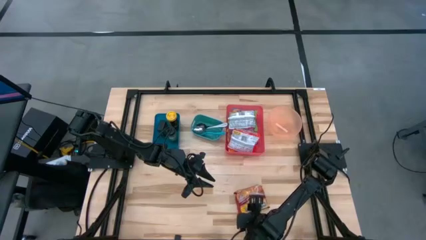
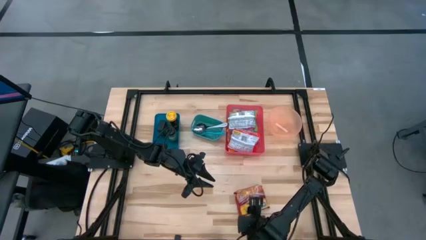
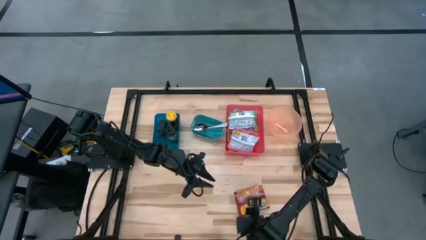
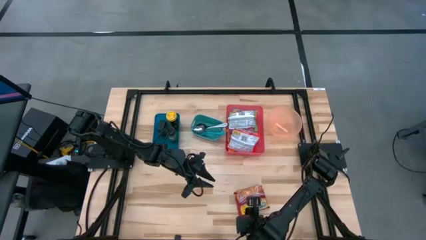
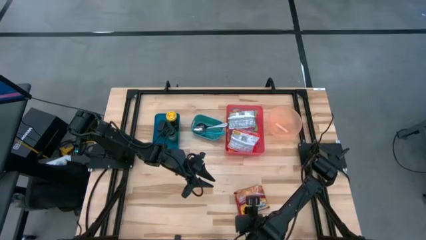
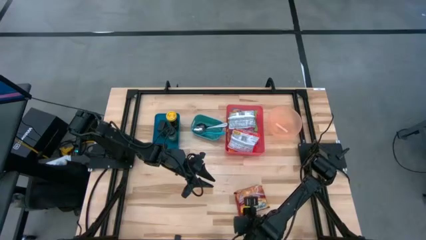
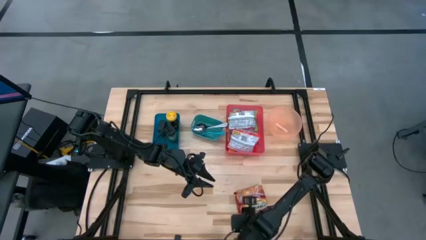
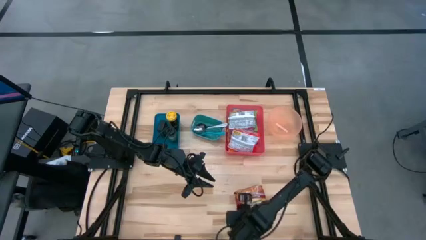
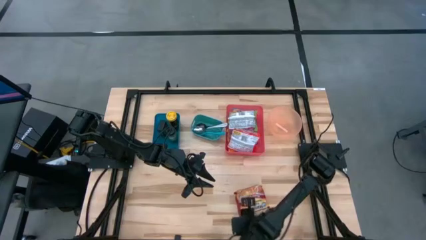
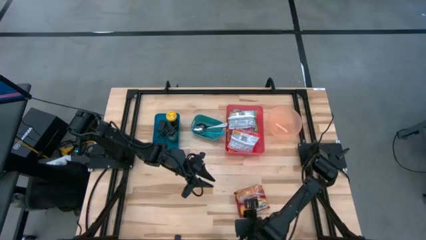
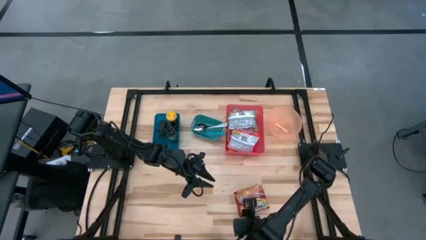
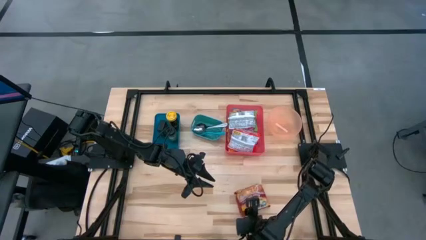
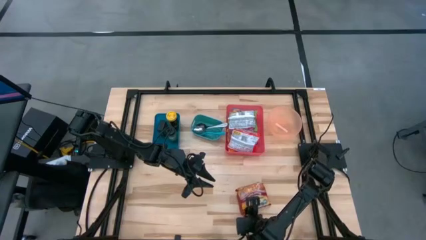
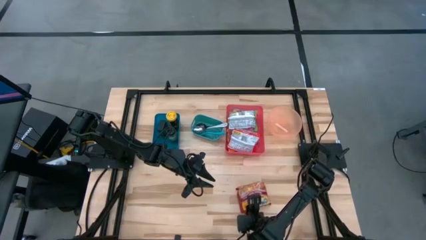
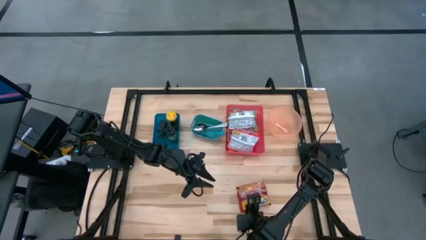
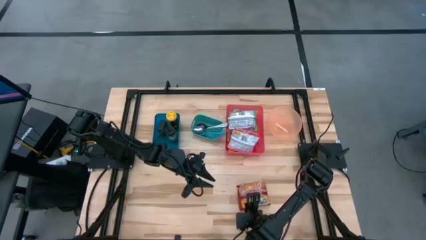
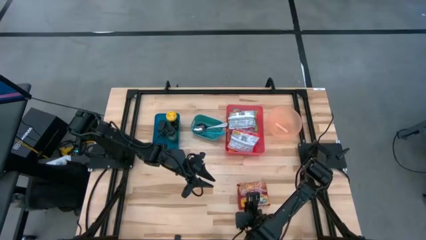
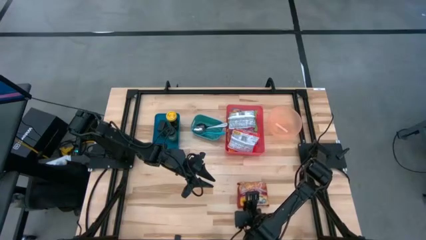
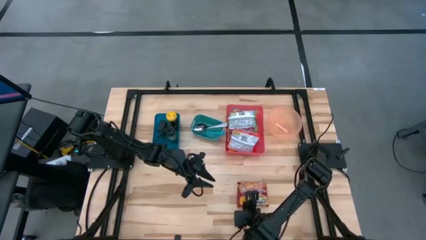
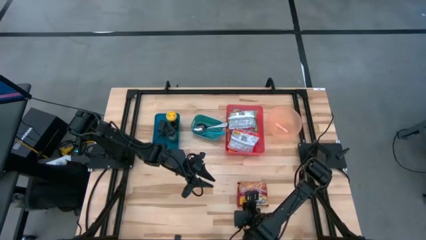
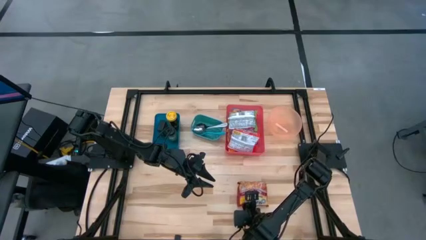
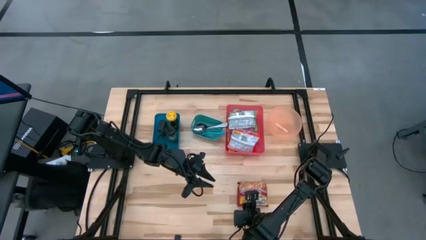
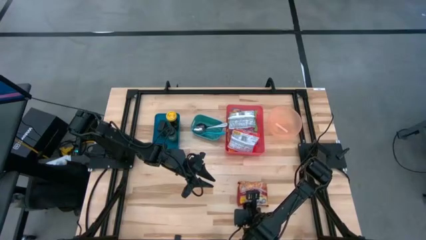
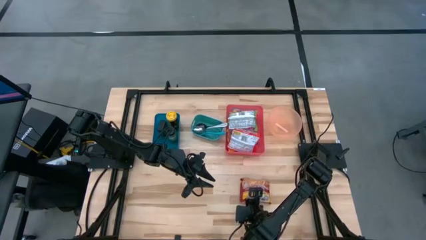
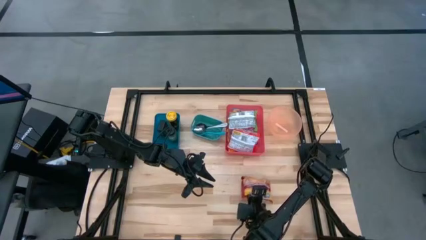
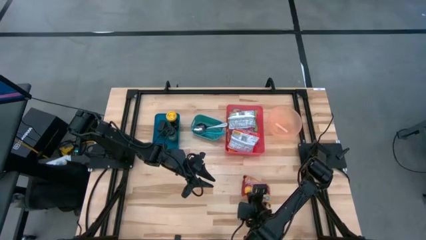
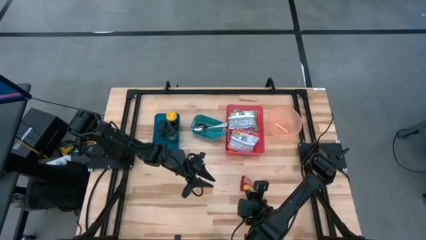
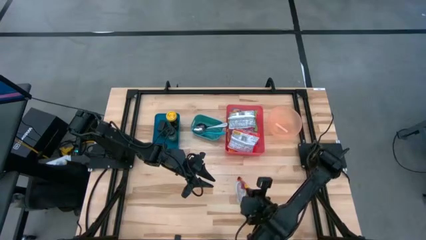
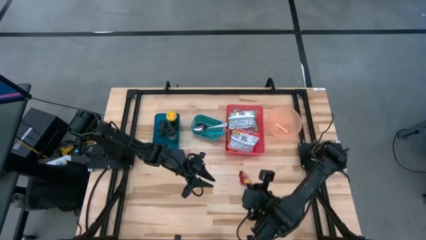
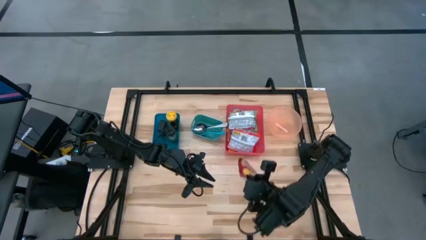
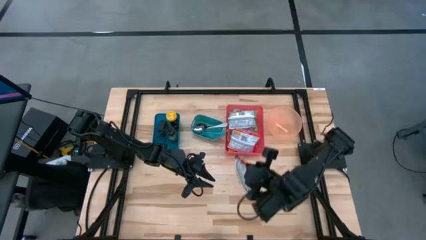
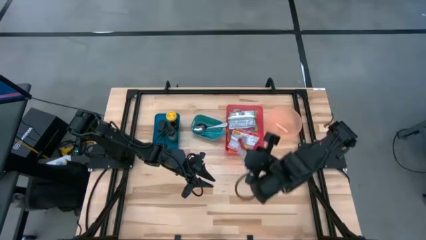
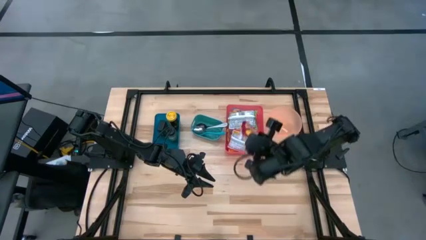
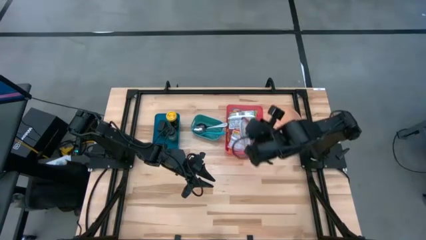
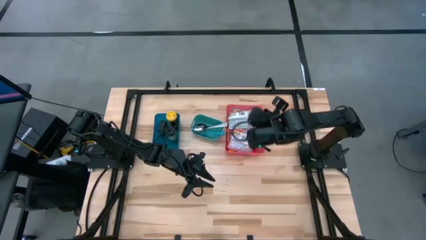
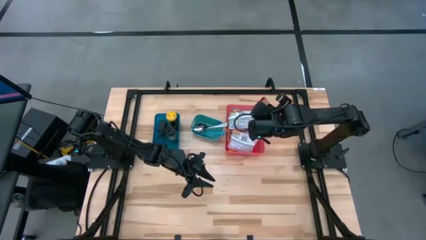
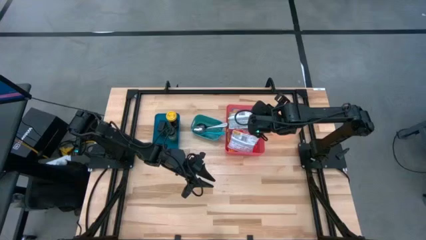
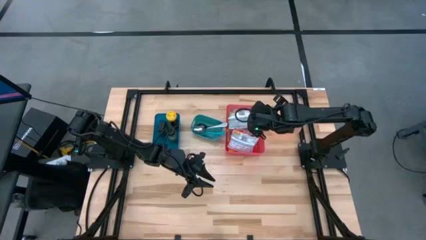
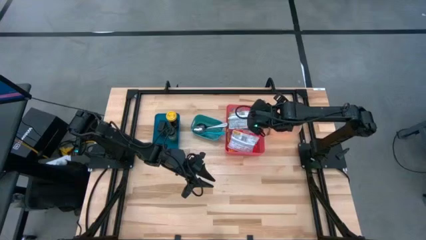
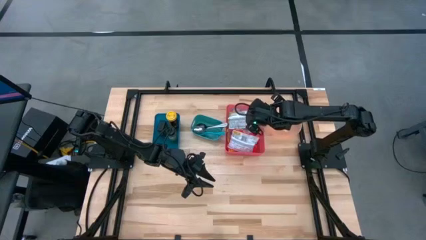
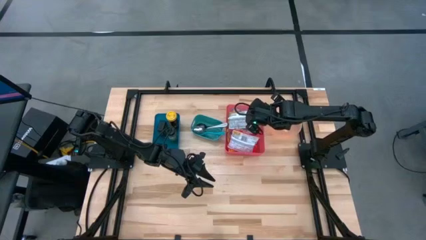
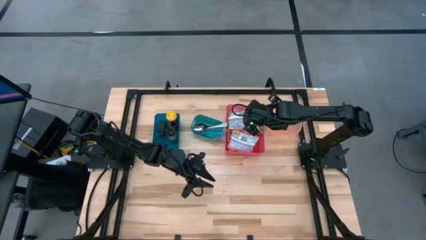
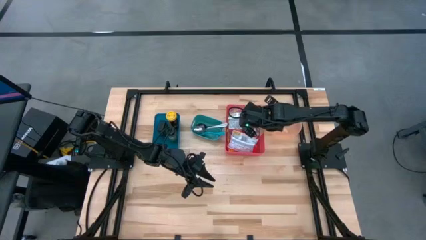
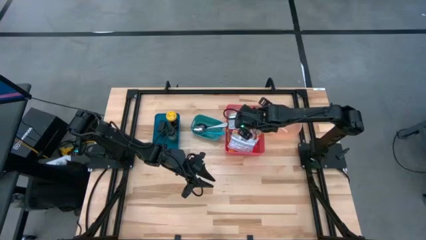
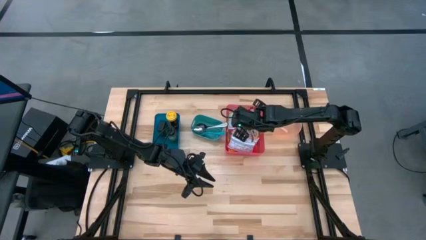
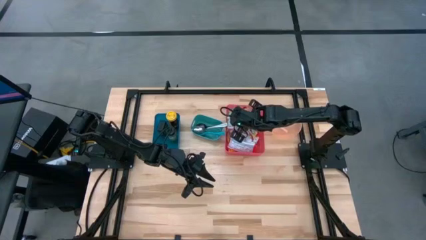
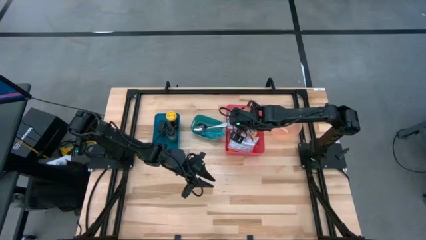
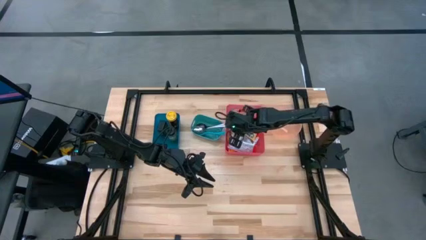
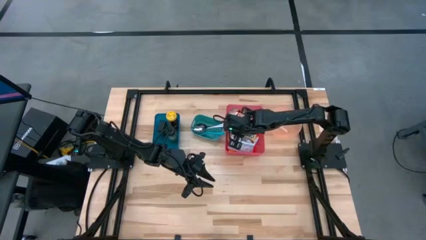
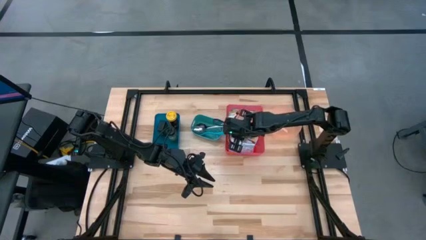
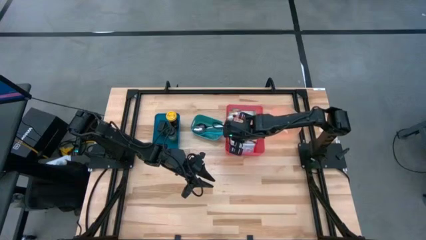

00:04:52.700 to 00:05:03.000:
Task: Pick & Place Food Item
Put the red noodle pack into the red bin

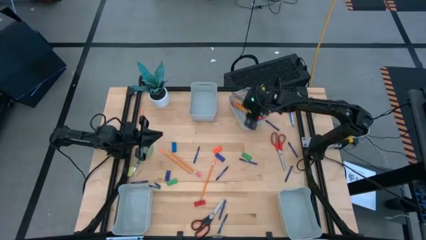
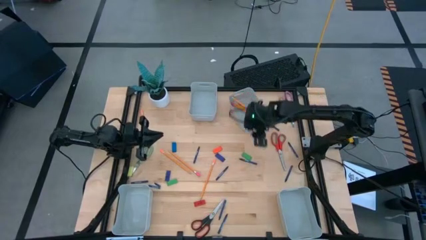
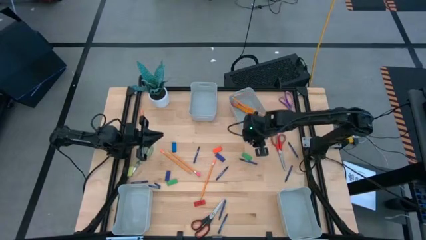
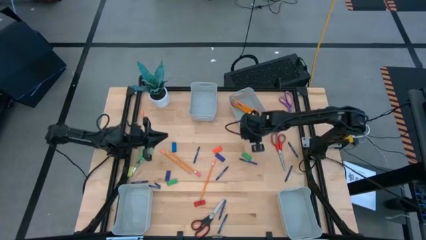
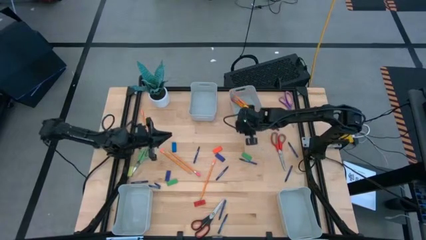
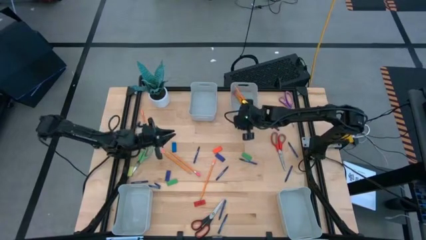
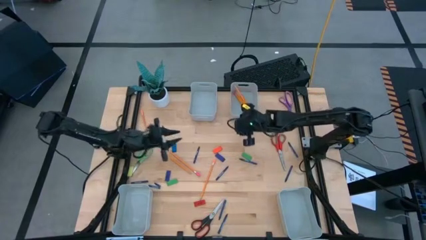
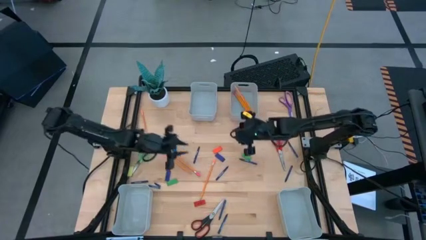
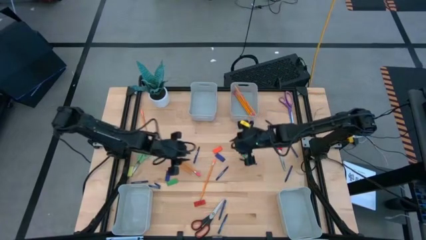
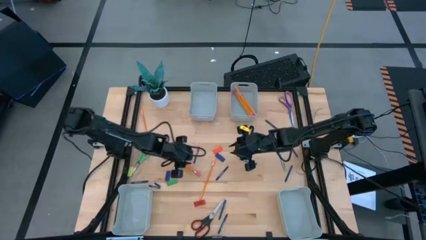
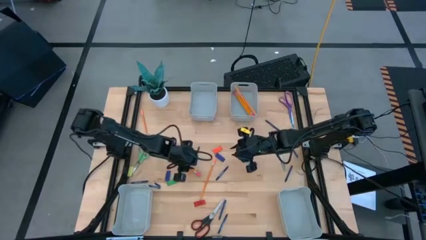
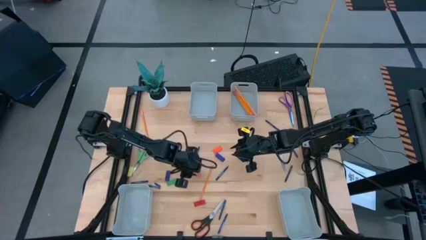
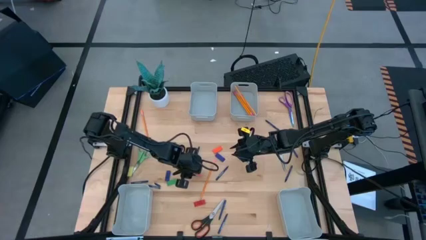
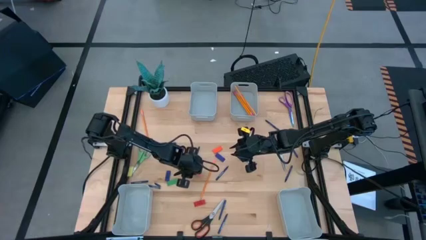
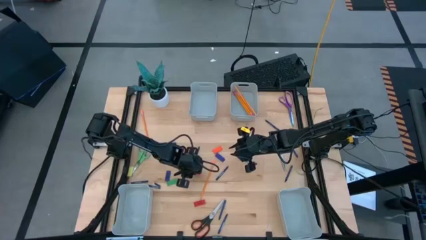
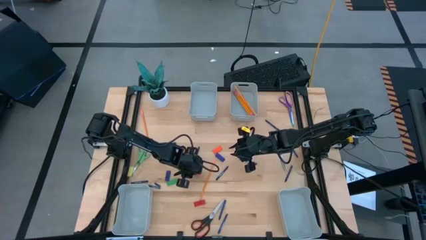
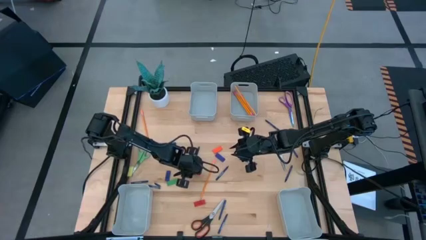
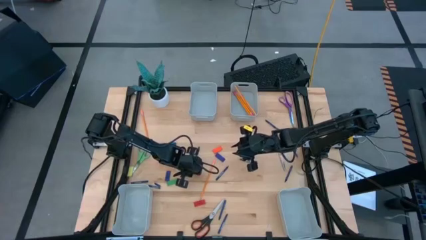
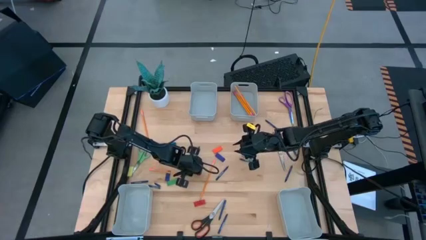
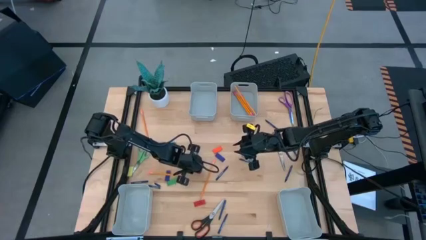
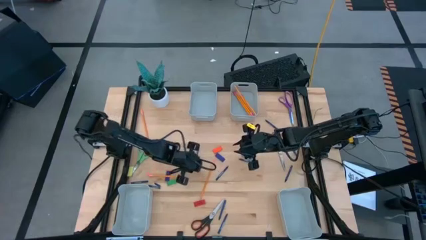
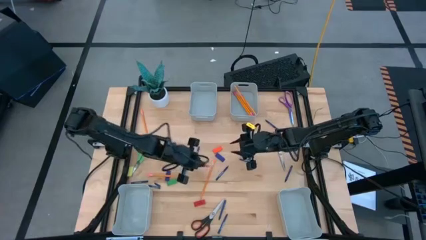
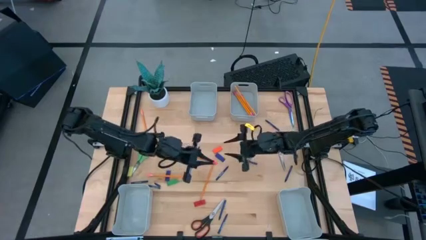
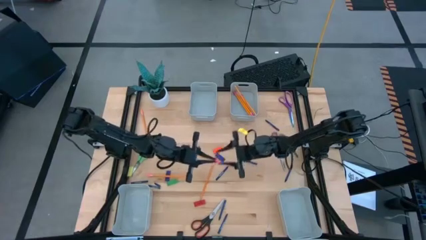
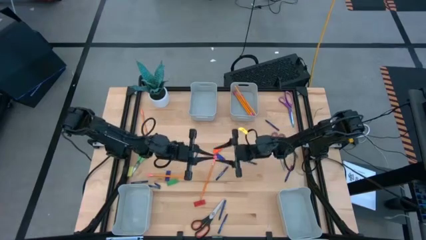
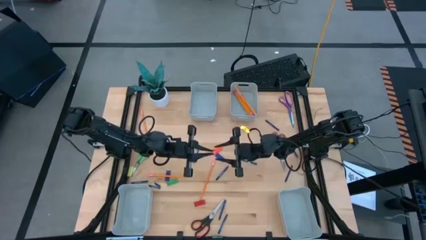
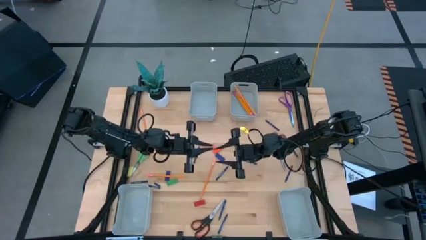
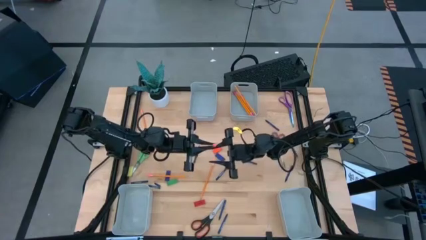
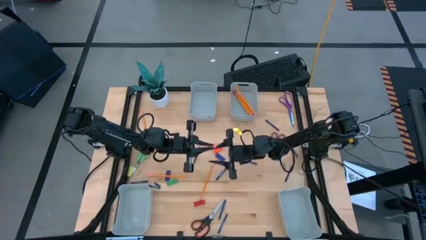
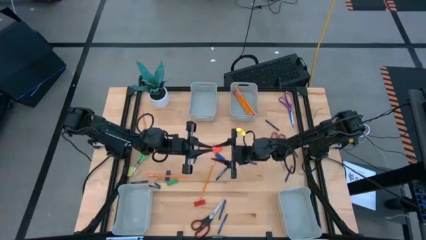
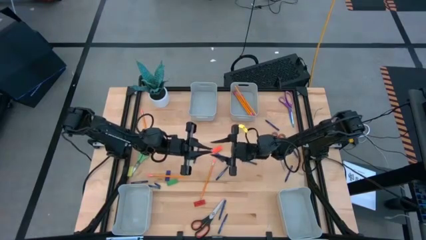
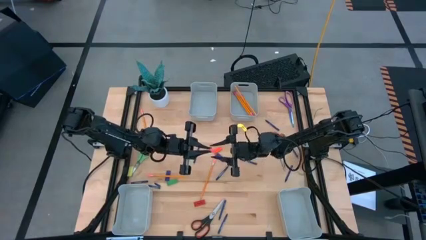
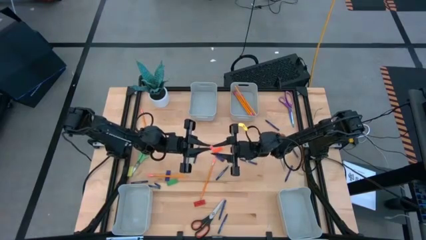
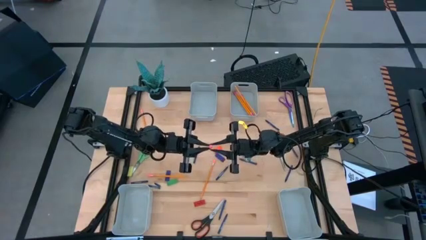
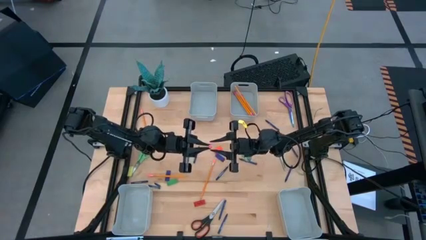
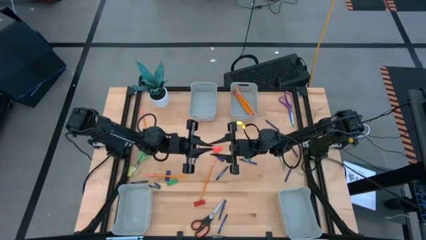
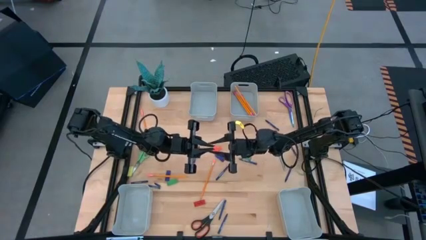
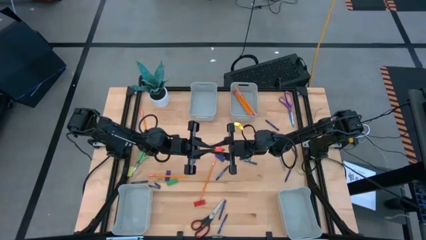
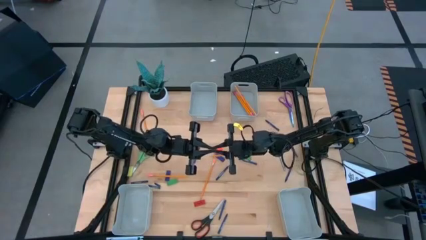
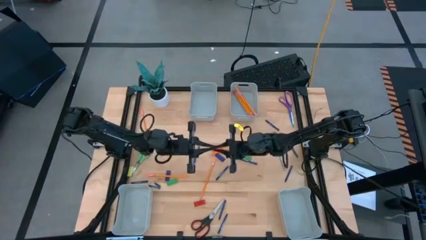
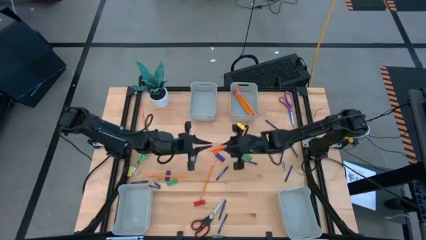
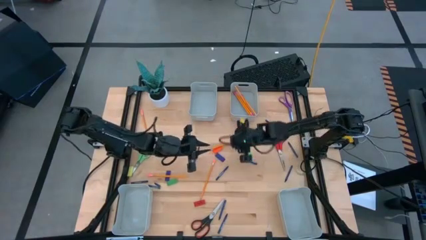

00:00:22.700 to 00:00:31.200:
Task: Sort crayons/erasers/pens/pencils in bins
Put the yellow pencil into the top right bin
